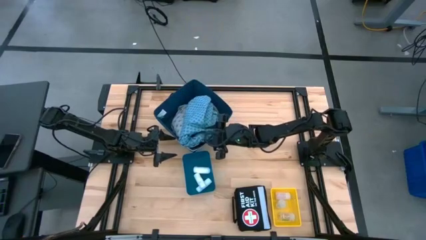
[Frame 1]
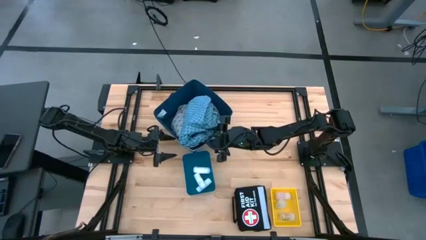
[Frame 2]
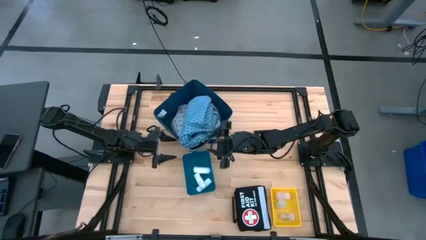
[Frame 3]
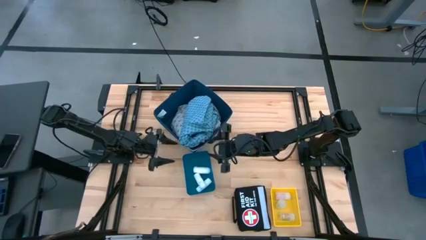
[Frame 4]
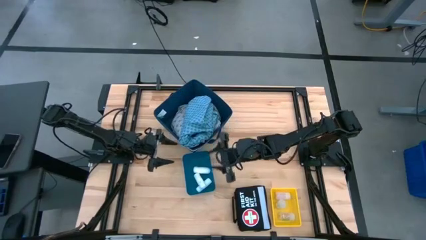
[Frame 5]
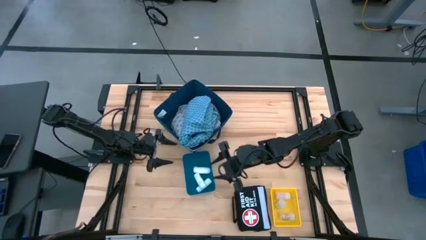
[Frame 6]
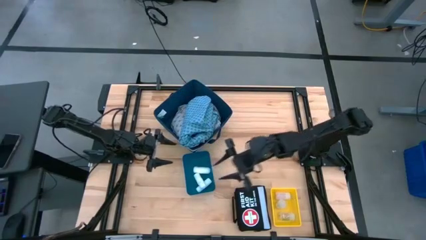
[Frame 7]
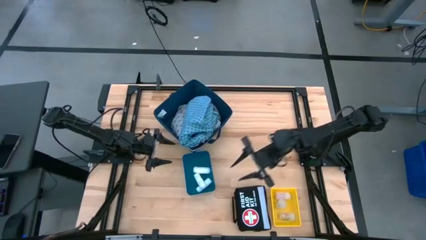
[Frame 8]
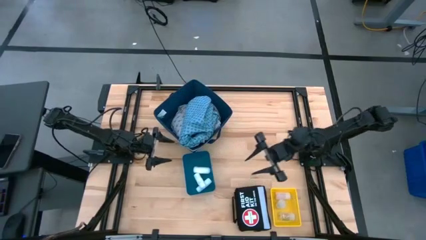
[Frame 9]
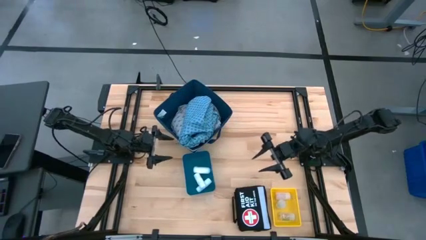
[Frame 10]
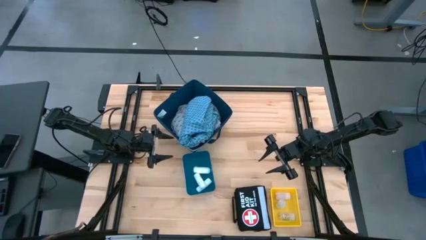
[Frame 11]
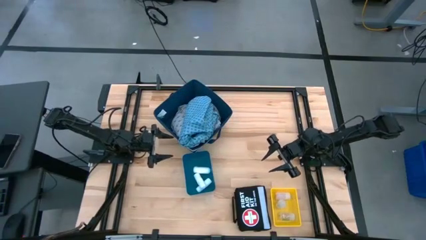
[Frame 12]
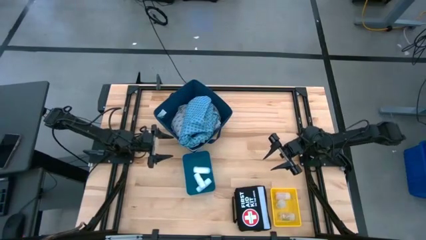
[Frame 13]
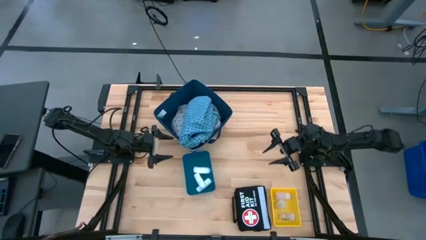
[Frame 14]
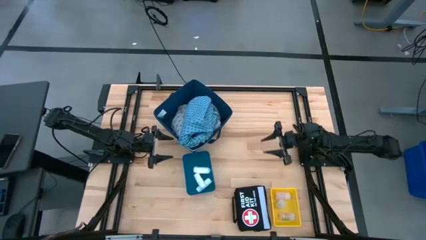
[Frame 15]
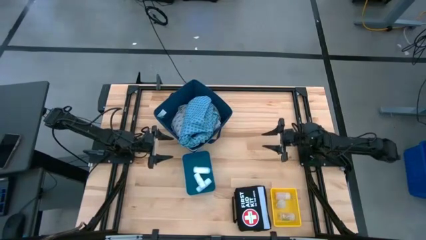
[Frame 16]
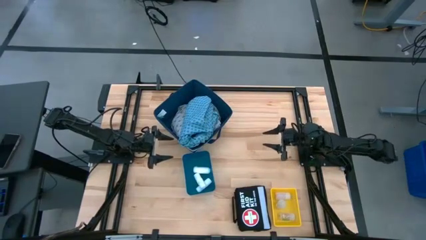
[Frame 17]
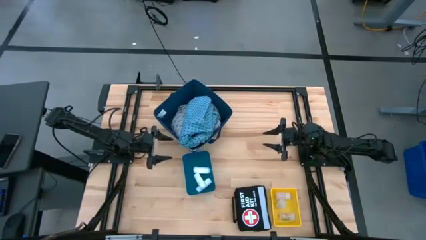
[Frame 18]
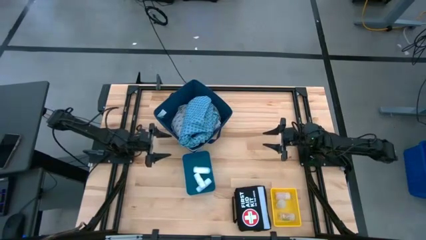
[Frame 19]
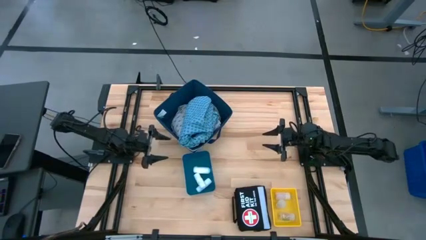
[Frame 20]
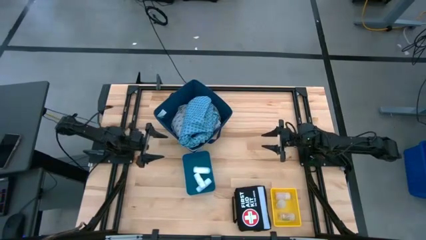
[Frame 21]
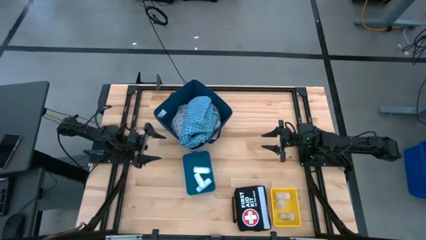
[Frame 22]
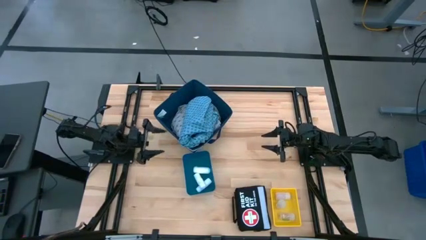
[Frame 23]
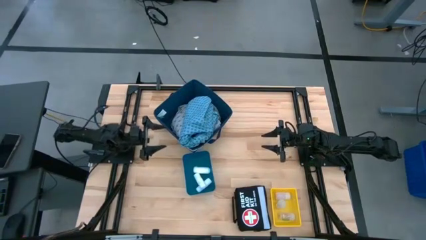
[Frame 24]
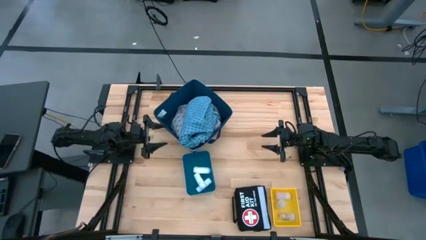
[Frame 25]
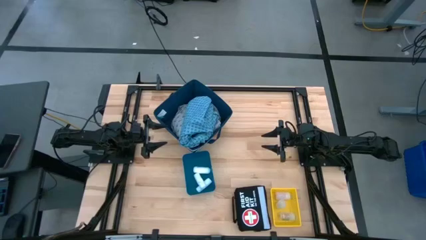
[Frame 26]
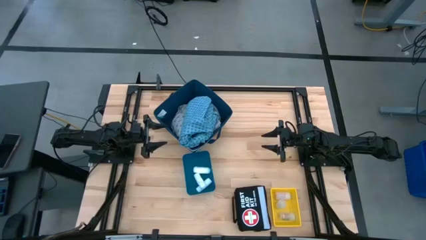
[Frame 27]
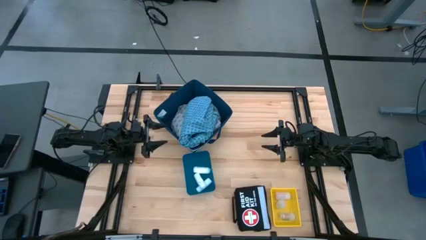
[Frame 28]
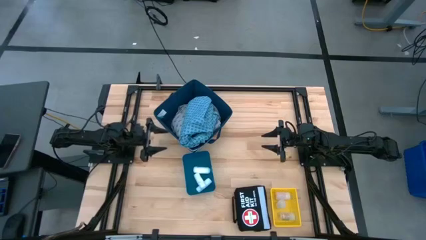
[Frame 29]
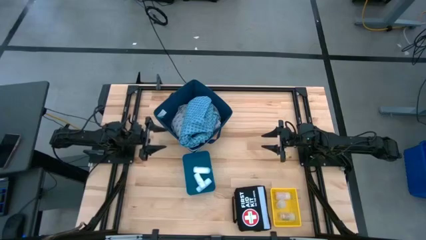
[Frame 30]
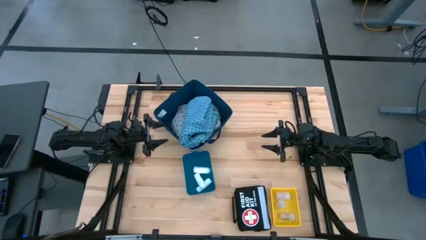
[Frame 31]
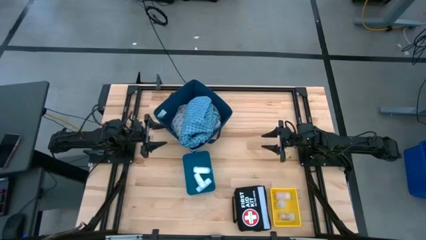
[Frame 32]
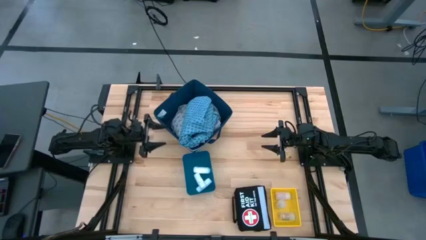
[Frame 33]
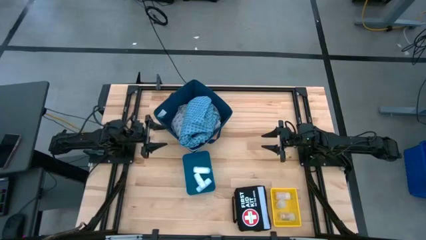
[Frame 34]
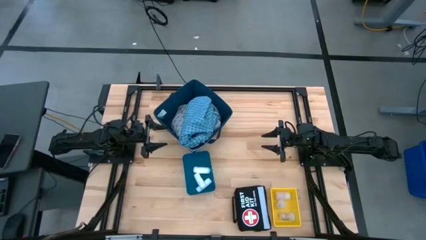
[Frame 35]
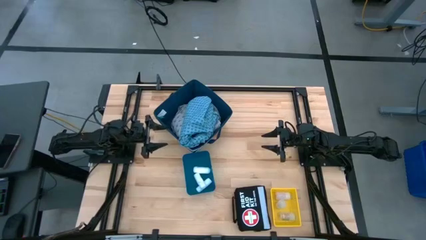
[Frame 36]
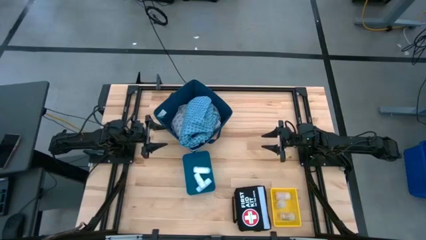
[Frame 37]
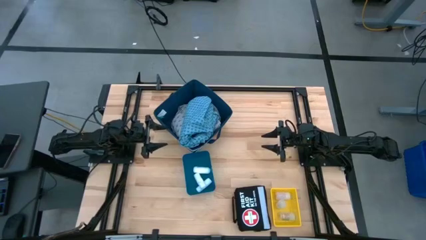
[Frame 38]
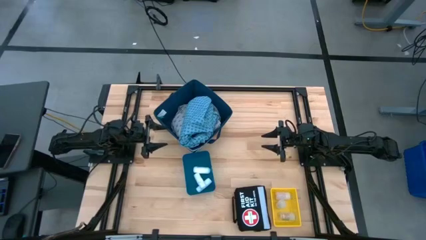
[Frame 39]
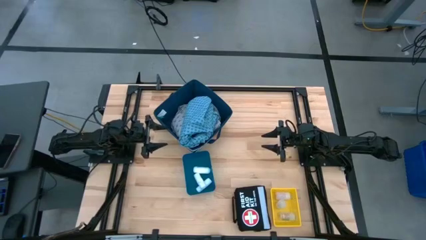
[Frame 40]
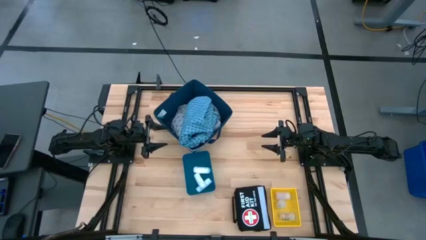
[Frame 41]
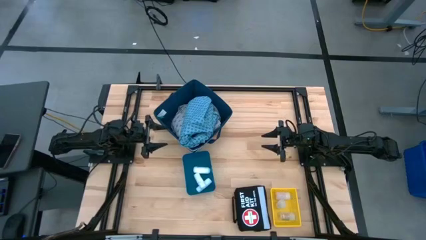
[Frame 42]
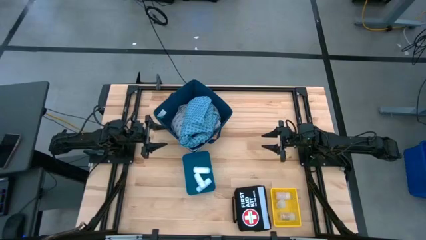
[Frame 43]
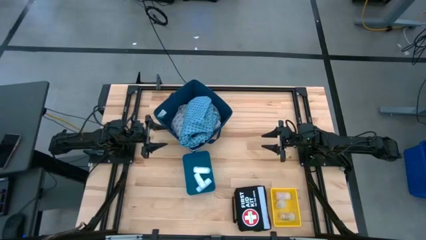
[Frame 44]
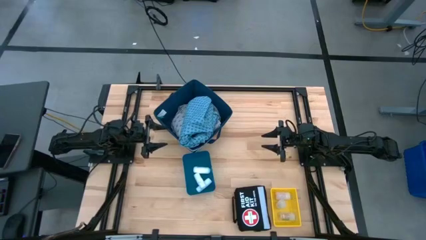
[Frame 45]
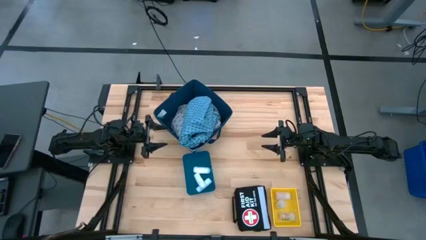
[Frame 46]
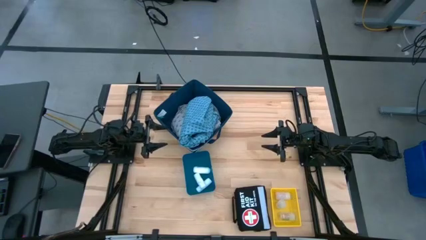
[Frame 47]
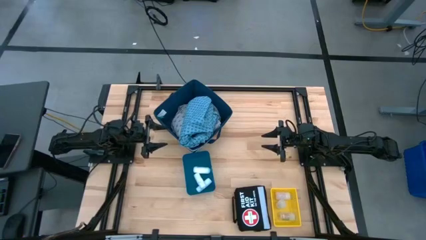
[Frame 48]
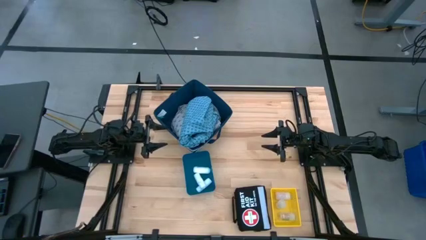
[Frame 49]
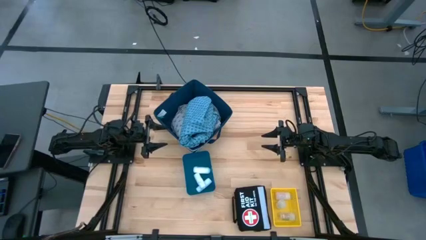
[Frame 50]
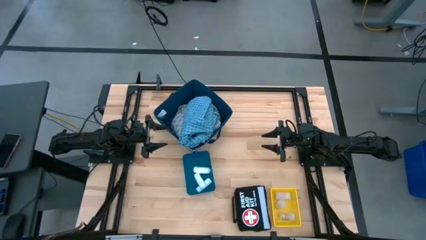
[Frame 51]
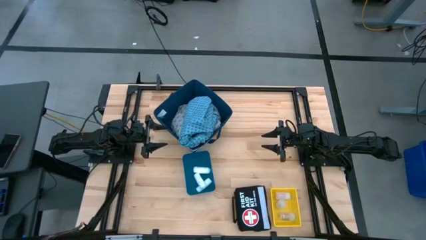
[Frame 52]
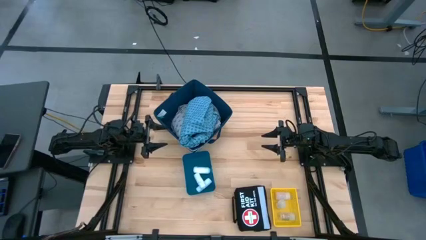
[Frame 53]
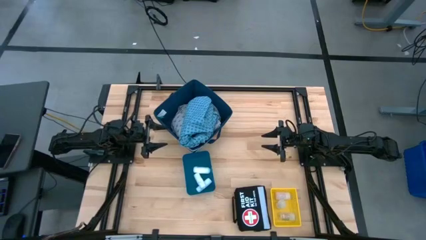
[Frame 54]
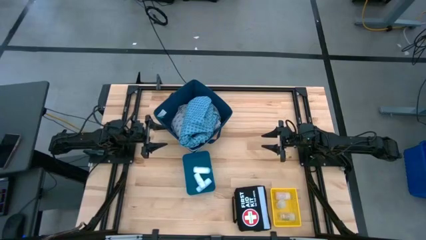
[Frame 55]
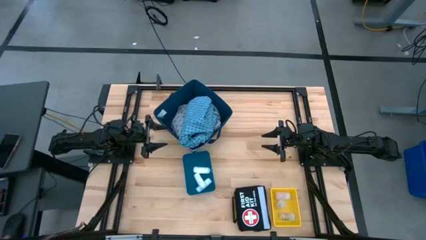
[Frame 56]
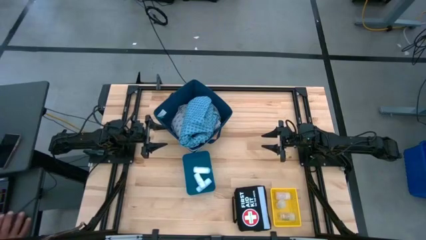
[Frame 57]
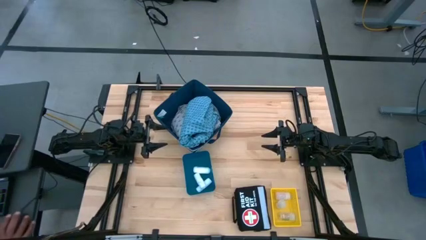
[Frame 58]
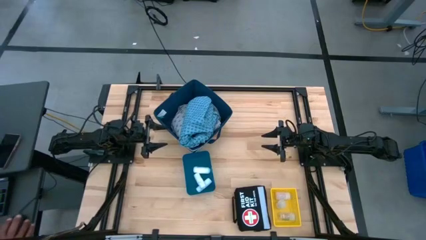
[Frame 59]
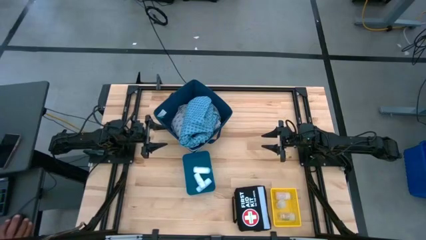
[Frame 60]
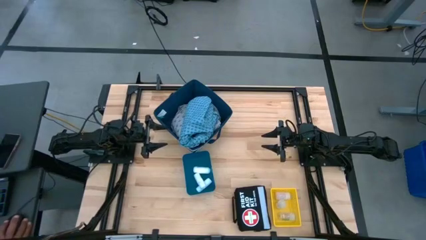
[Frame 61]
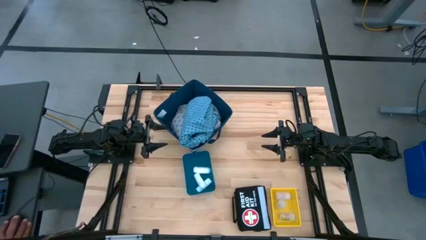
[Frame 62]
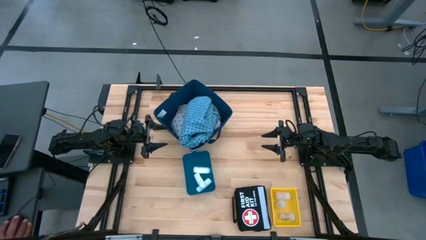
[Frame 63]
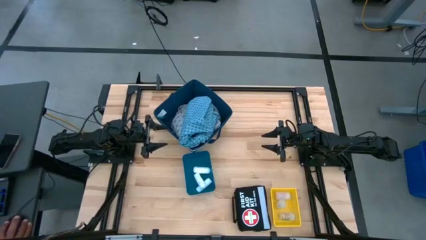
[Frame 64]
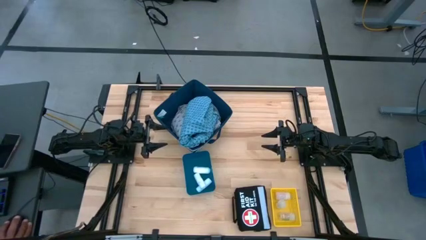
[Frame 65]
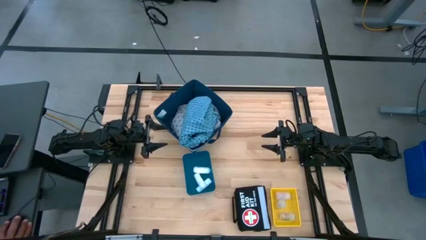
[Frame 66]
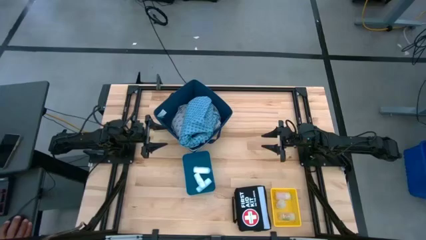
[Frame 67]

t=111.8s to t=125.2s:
Task: Pick & place medical supplies in basket/bin
Return to Home Position
